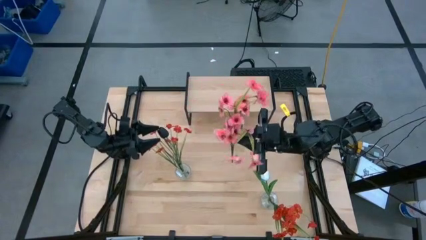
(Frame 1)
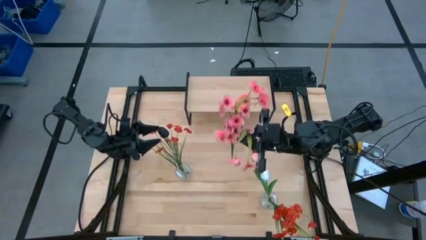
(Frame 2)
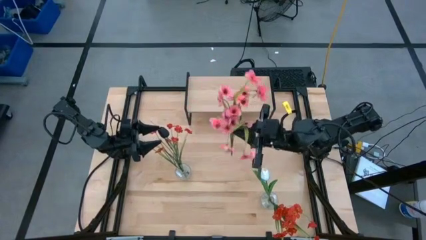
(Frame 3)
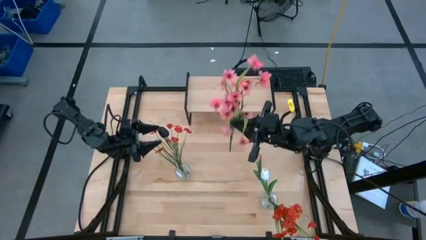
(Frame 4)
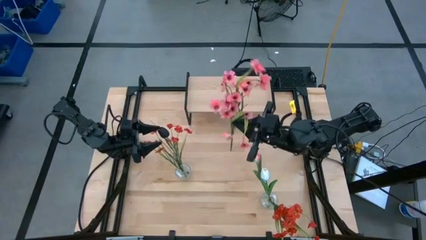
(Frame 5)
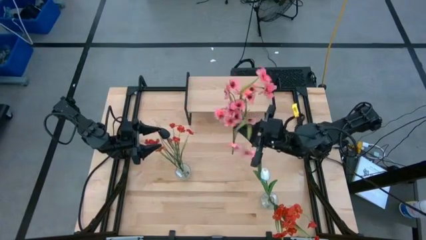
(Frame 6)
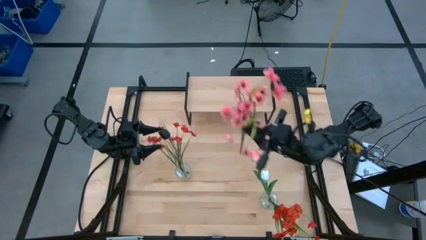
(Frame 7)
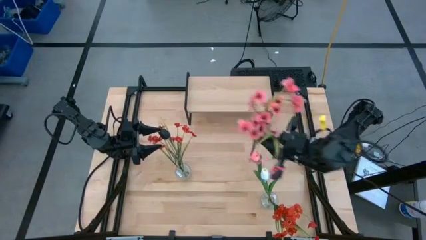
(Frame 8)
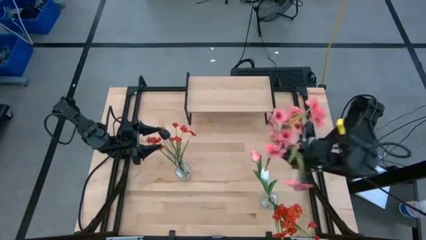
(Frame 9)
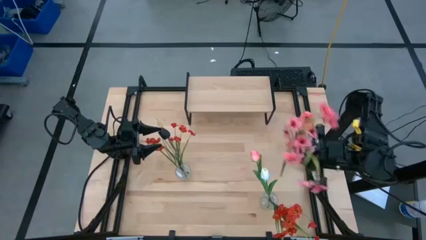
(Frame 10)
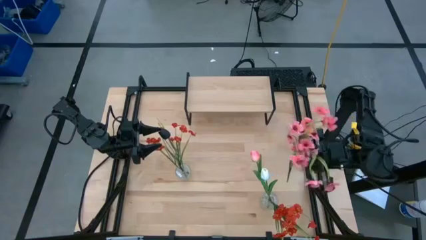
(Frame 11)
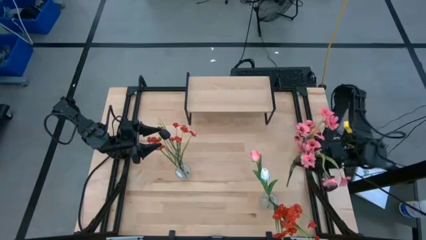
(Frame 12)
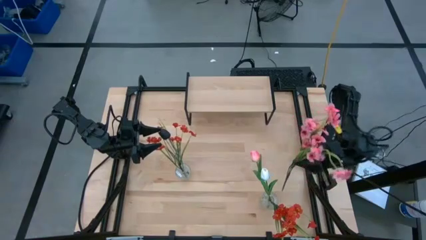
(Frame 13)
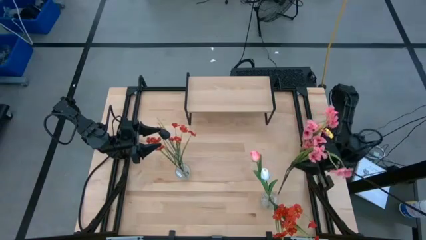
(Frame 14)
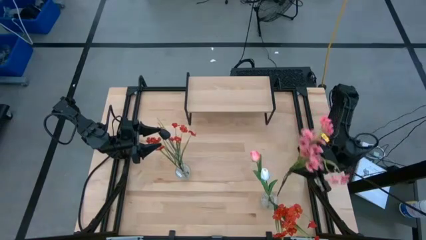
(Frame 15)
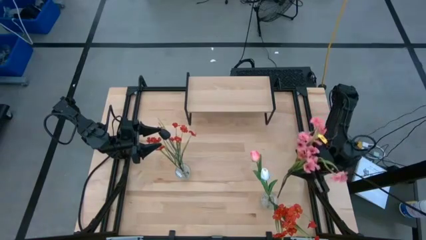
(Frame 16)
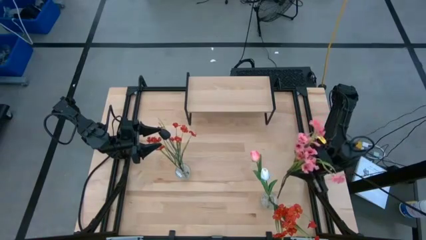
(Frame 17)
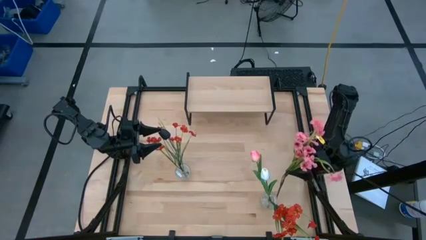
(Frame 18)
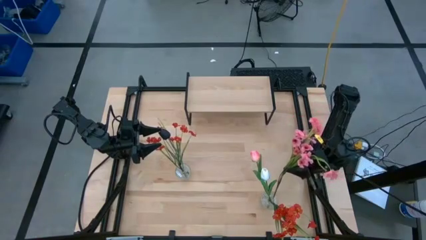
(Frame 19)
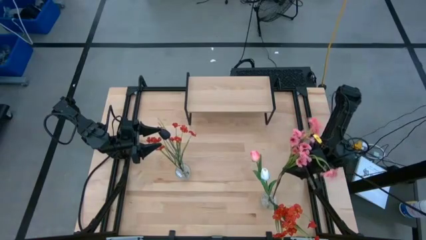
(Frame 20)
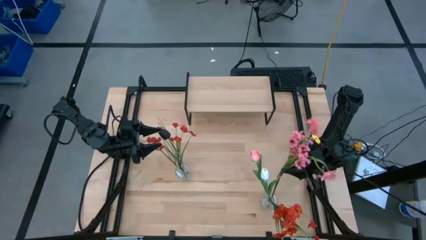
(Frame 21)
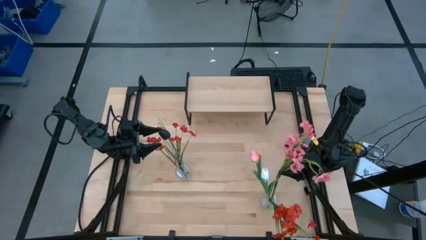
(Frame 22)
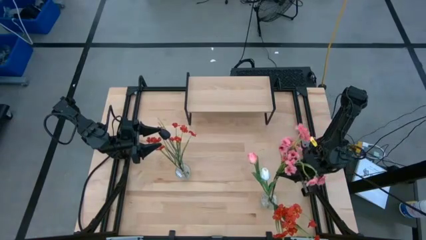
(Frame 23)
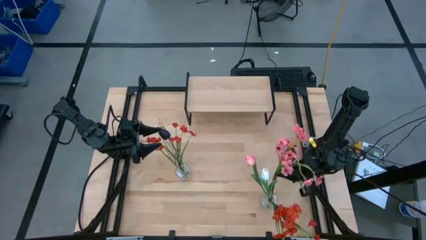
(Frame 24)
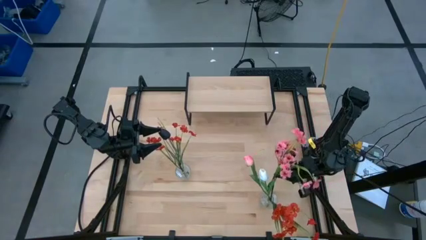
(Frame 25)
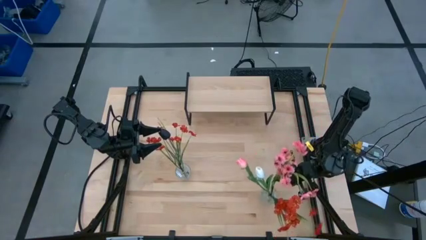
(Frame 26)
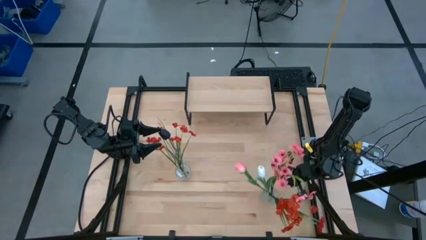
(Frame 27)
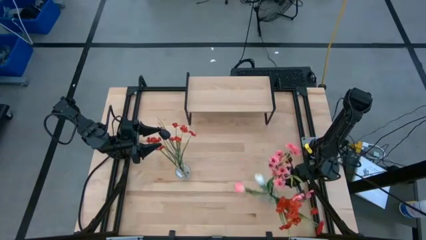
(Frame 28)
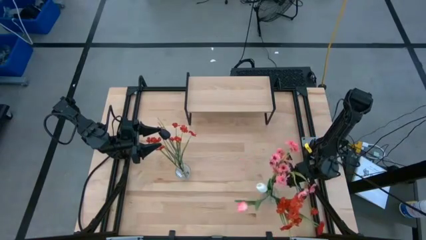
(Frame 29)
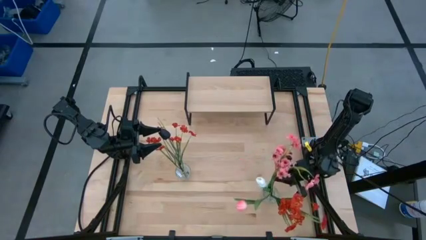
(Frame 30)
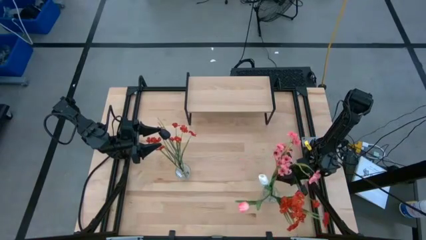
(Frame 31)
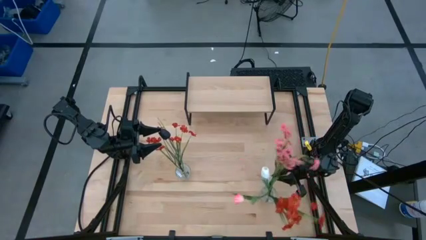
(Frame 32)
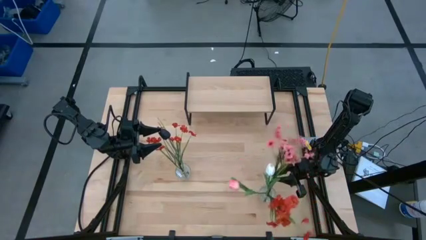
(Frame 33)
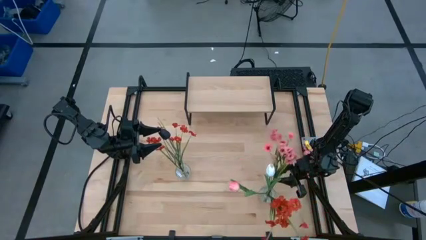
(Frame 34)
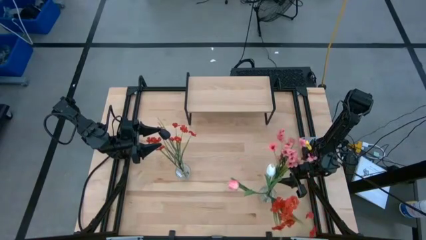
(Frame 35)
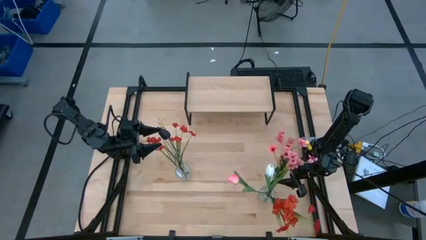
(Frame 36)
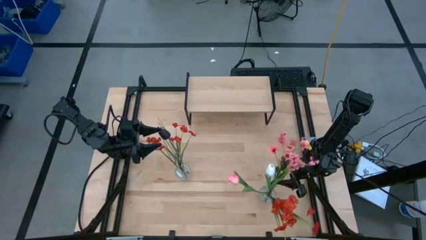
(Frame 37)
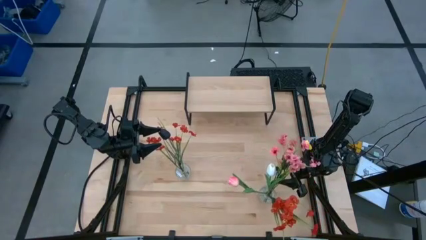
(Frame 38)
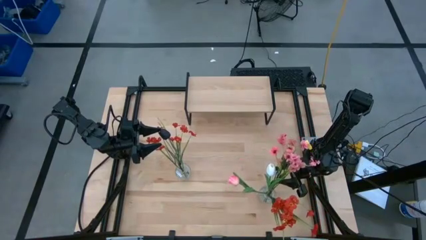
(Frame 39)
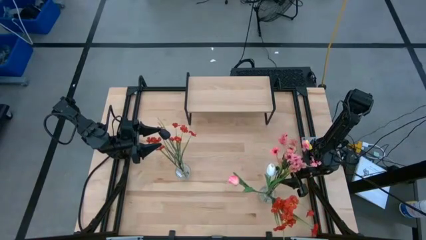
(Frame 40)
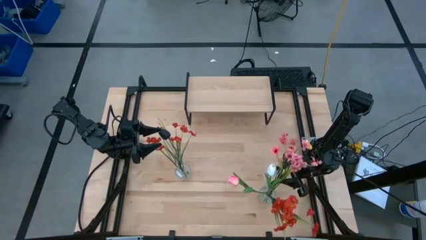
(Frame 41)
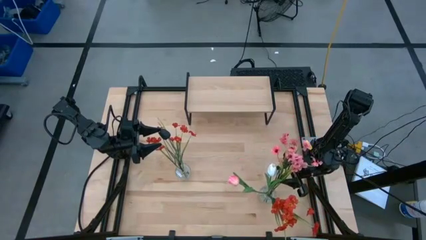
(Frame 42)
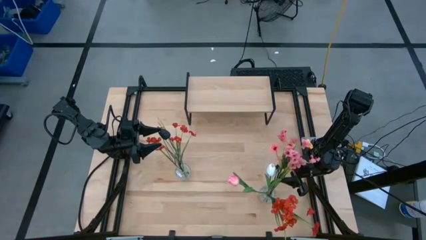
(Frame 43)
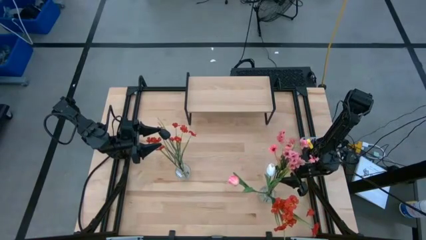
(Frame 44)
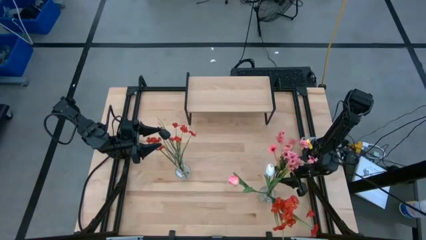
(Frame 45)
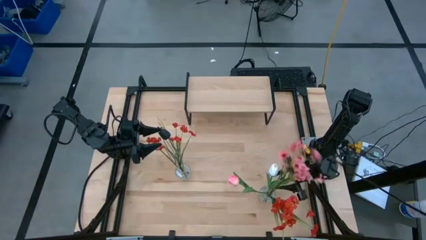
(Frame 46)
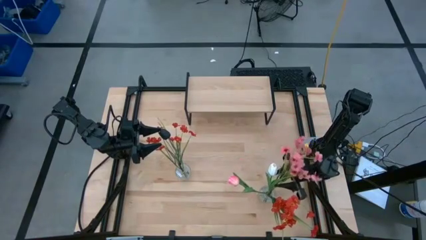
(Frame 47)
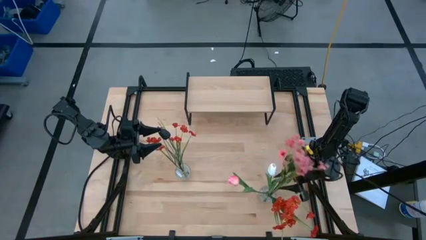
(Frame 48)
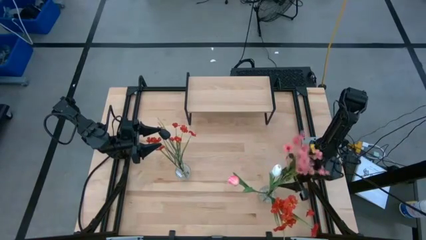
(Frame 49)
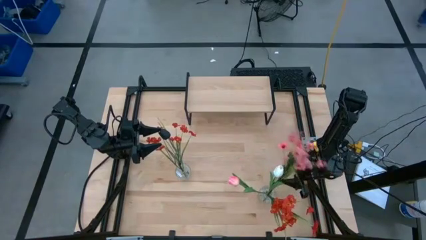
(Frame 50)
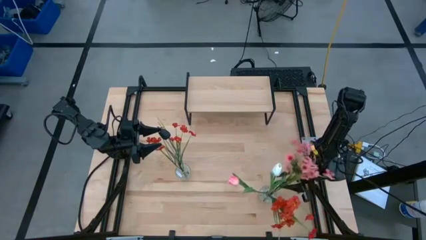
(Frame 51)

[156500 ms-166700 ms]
Task: Pick and place flowers into a vace then onto a shelf
Put the pink flowers into the right transparent vase

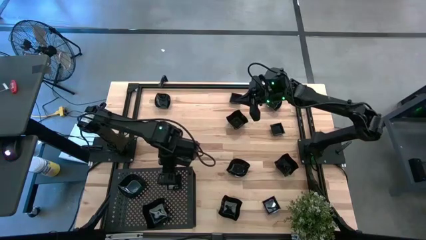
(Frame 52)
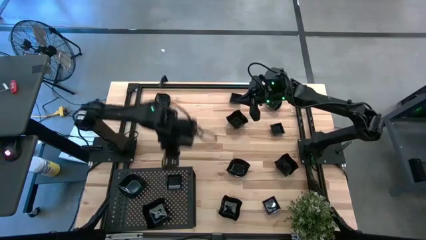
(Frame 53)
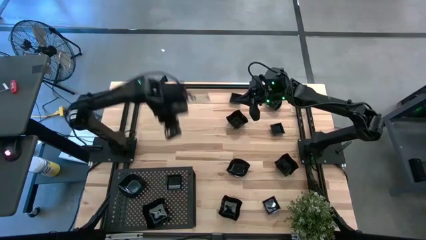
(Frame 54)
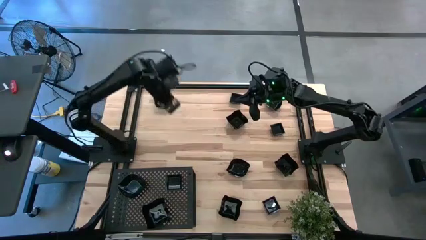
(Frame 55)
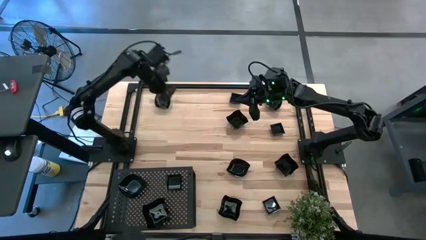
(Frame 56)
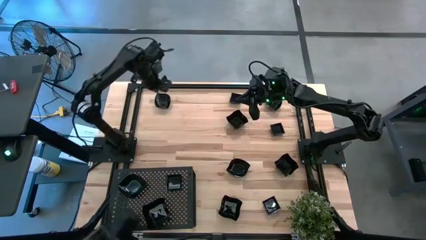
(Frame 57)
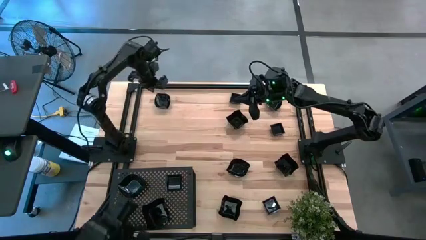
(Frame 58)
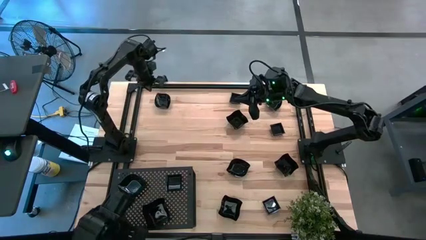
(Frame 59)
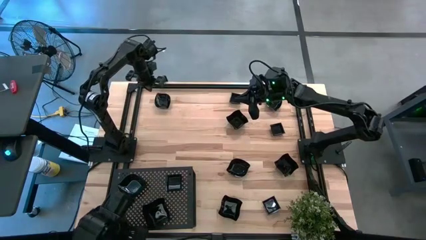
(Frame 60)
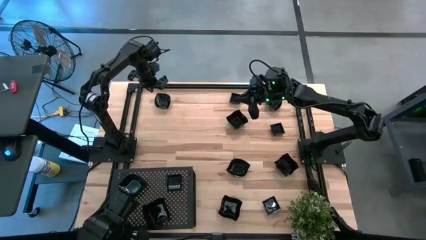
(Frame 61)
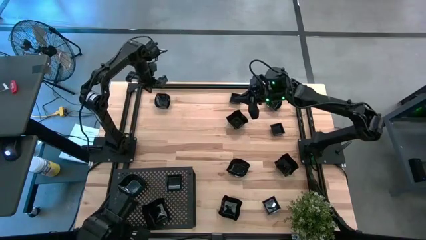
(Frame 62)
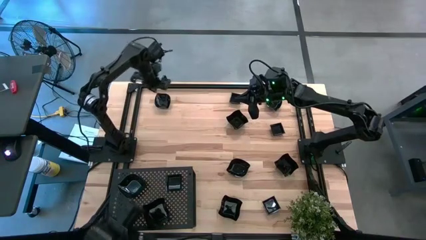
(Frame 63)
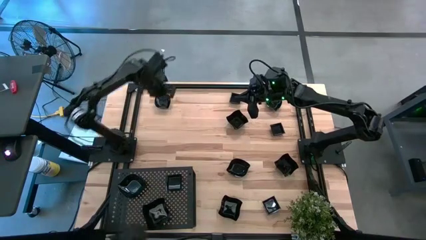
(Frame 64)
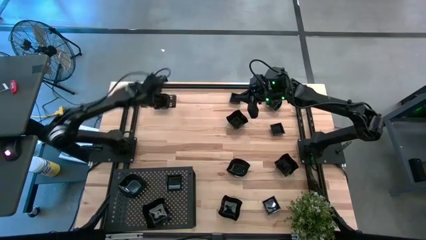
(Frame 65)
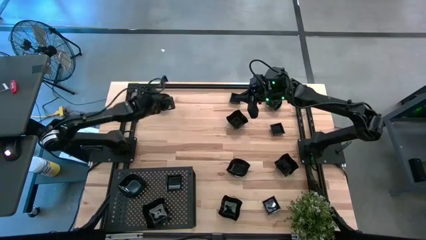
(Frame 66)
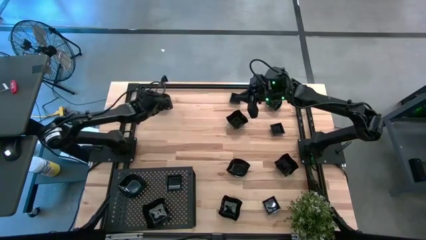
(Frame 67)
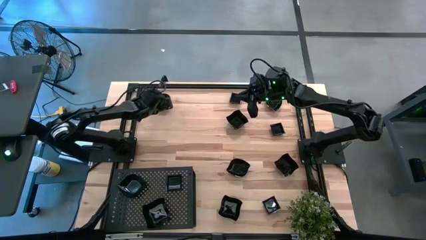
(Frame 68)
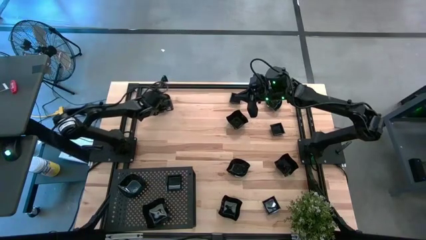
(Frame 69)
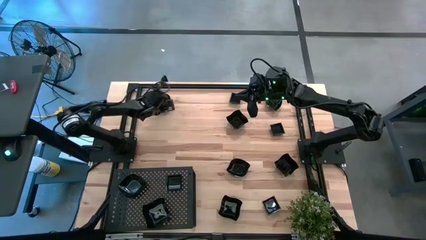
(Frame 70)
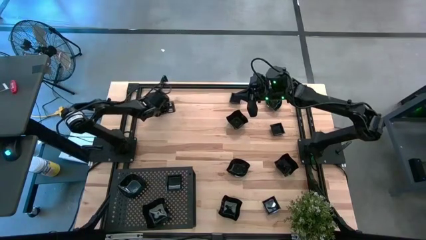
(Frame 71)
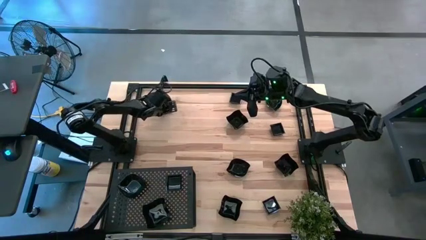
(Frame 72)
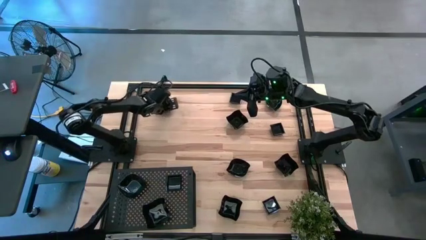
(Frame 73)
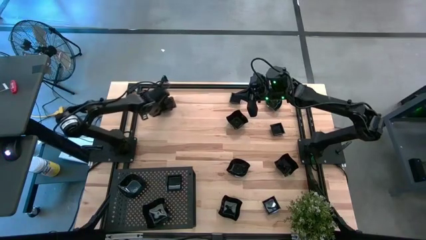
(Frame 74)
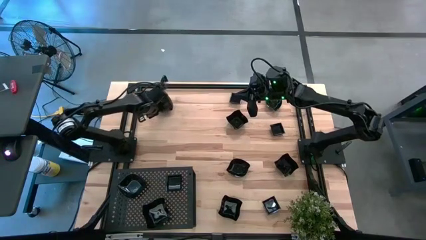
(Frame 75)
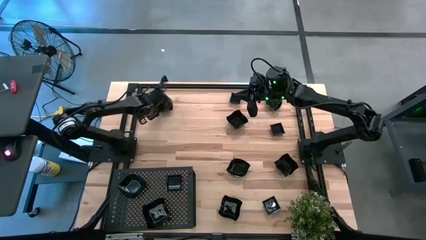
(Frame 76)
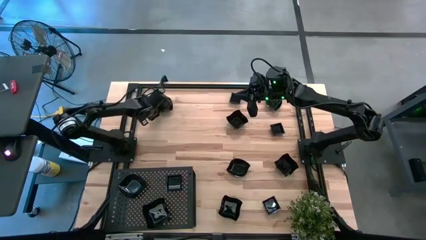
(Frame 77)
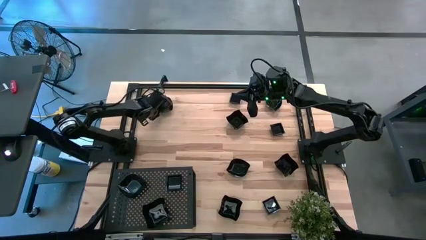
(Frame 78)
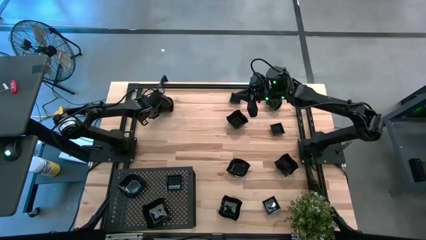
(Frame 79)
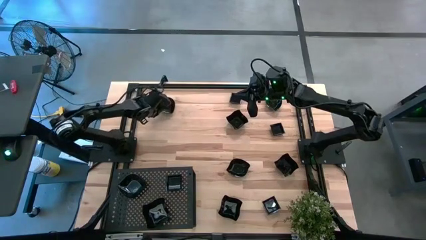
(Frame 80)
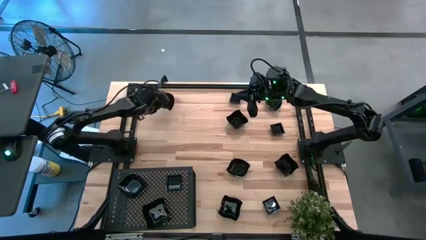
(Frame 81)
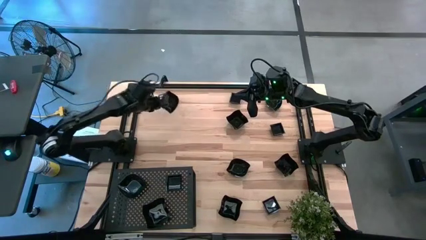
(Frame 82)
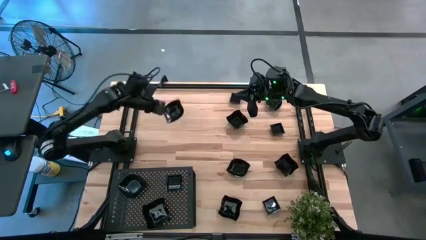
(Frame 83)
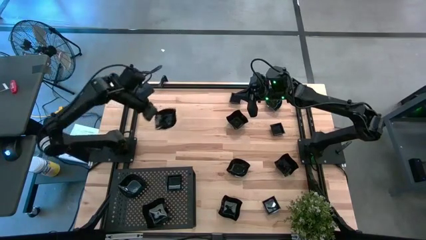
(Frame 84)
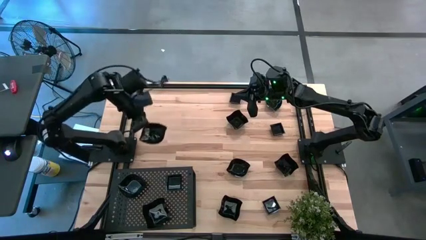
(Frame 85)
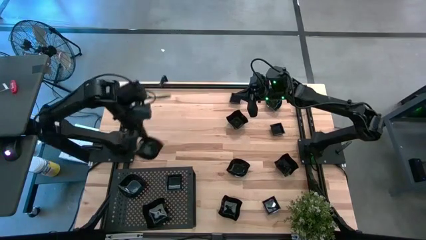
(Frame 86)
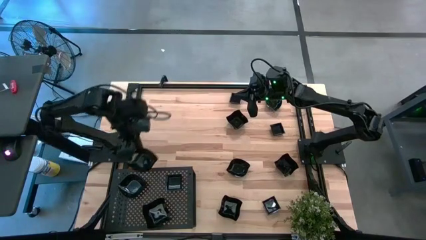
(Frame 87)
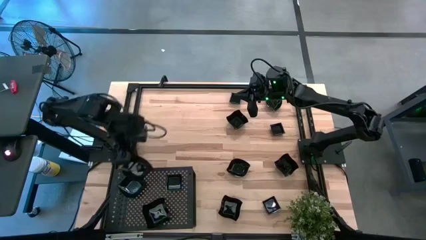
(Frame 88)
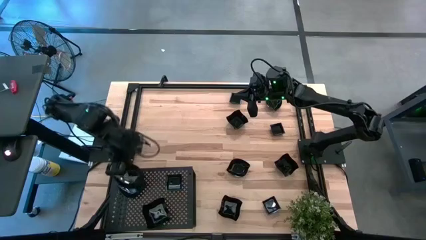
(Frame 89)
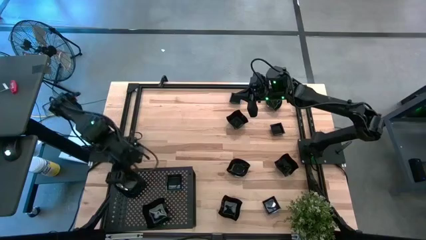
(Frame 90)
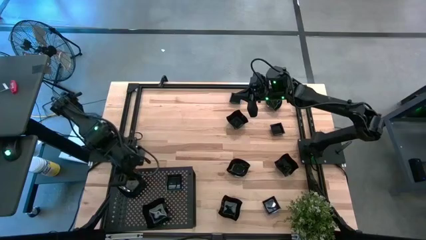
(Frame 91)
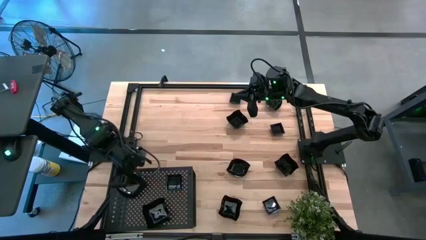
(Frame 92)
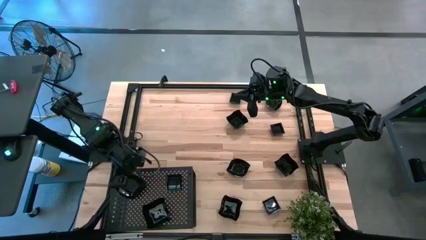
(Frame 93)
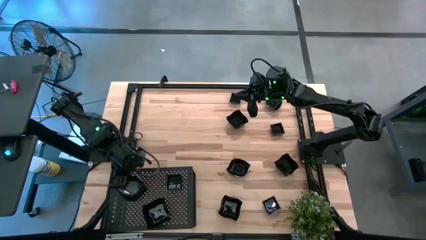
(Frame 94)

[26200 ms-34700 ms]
Task: Pick & Place Mini shaped plates
Stack the leaf-shaped plate on top of the leaf-shaped plate on the shelf
